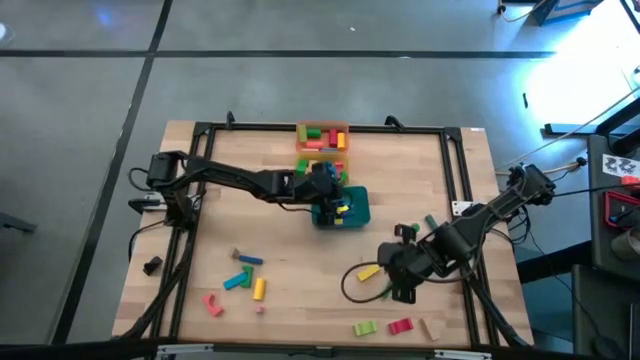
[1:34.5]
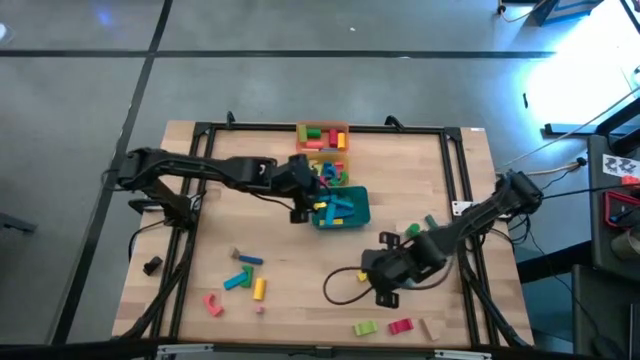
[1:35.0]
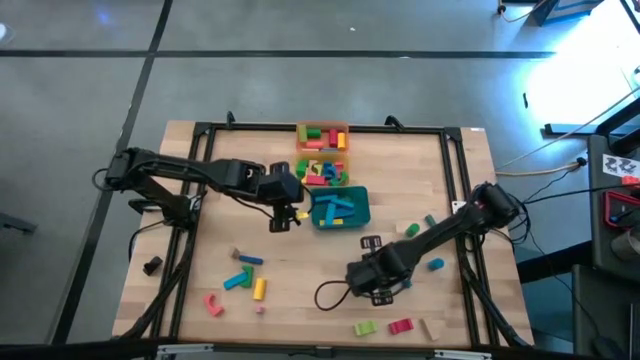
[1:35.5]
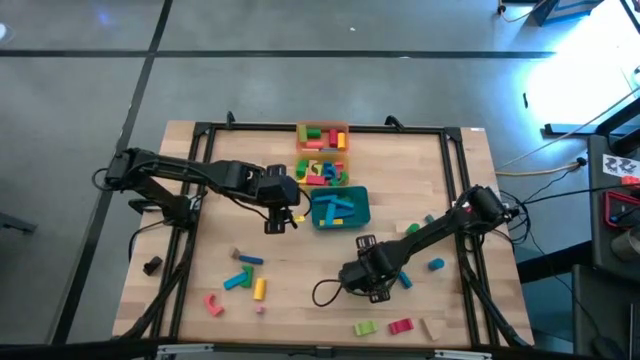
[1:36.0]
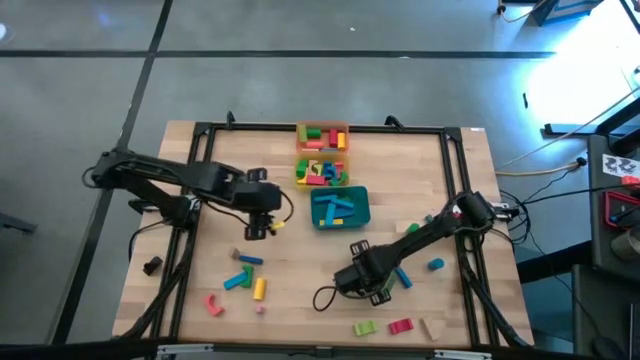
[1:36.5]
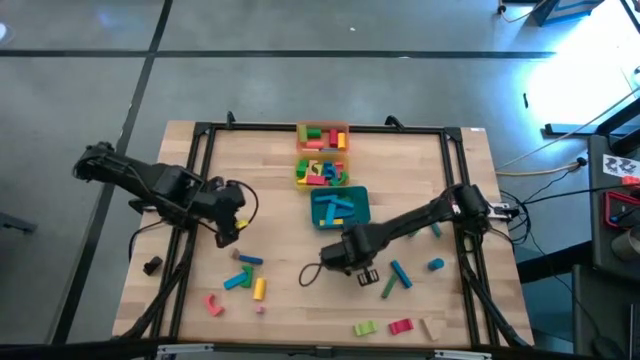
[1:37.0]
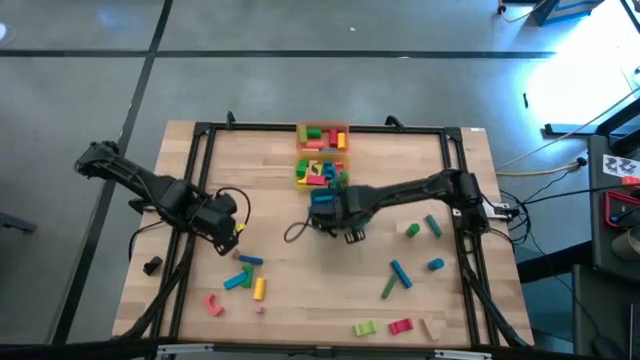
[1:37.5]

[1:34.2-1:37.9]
Task: Sort blocks by size
Put the yellow rectangular block into the blue bin

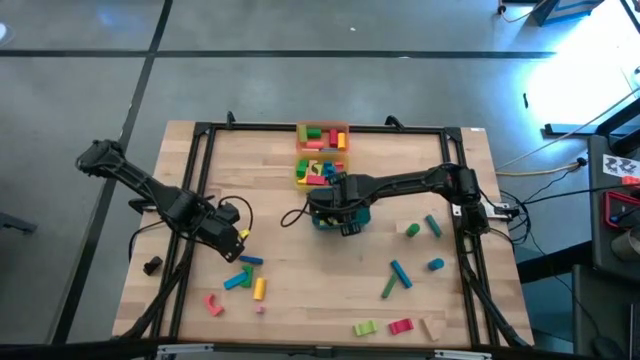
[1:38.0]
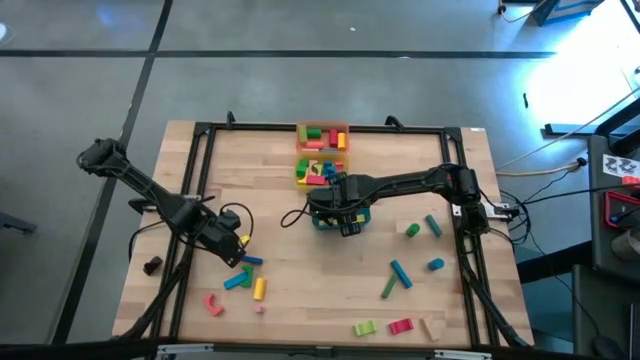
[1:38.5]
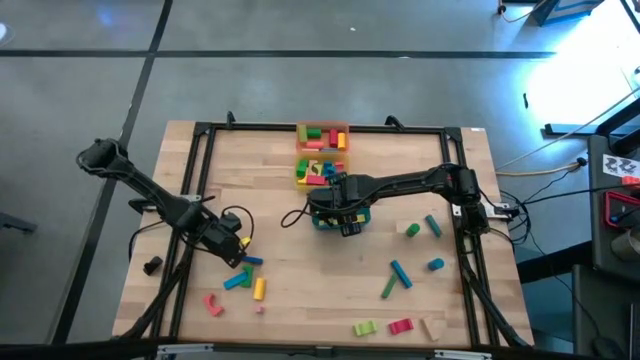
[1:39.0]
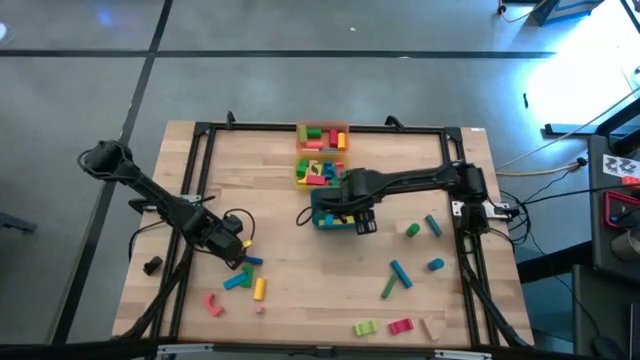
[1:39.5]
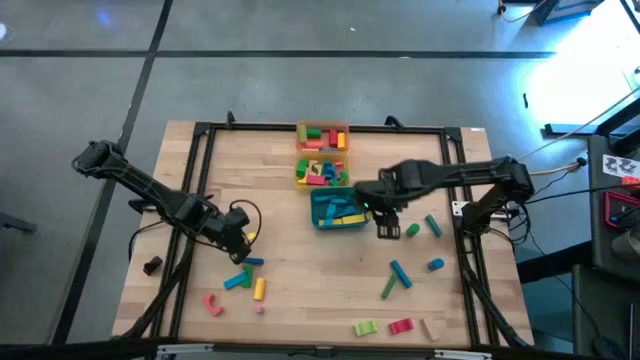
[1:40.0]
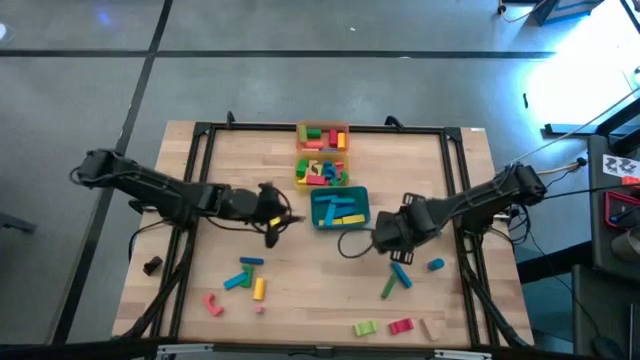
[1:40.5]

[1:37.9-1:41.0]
Put the brown rectangular block into the blue bin

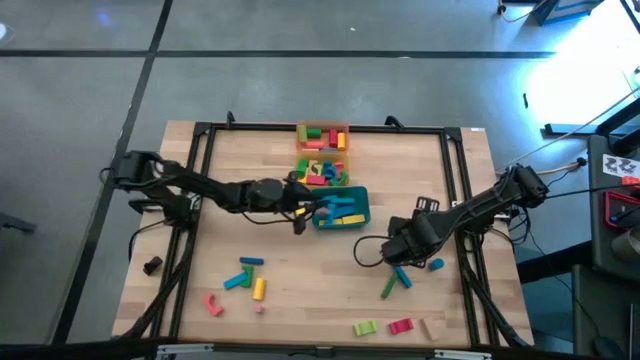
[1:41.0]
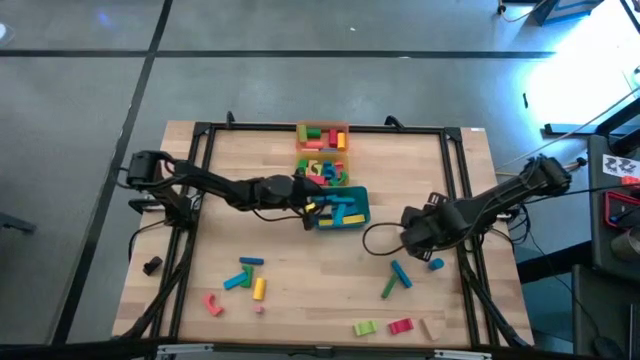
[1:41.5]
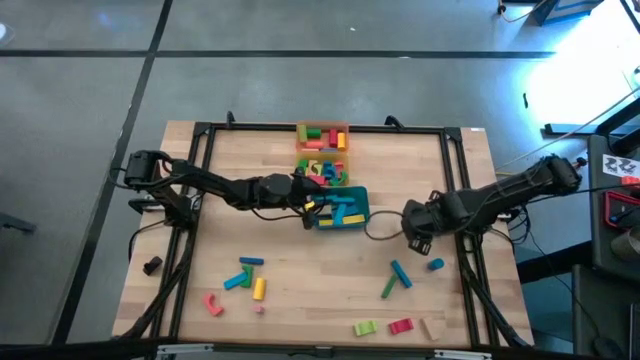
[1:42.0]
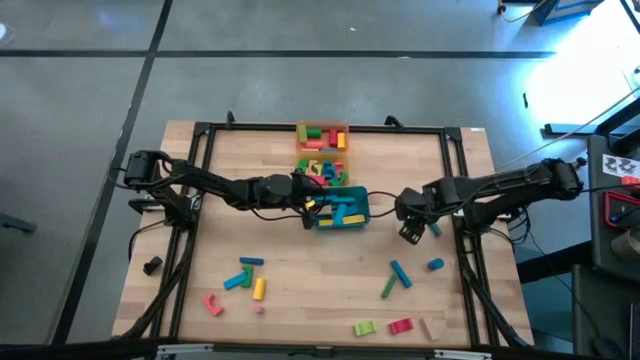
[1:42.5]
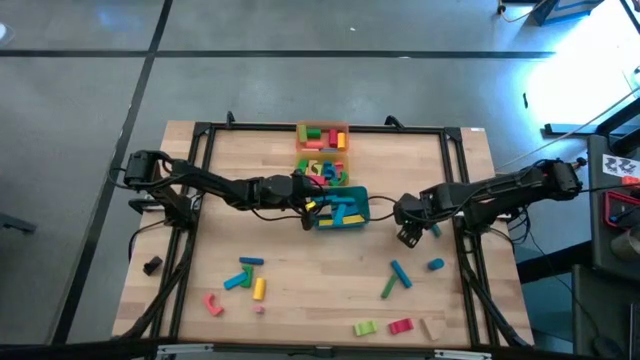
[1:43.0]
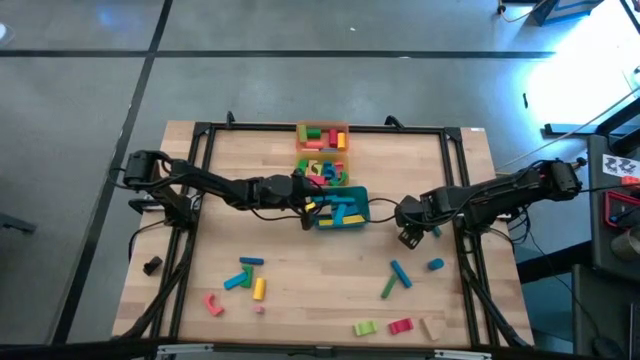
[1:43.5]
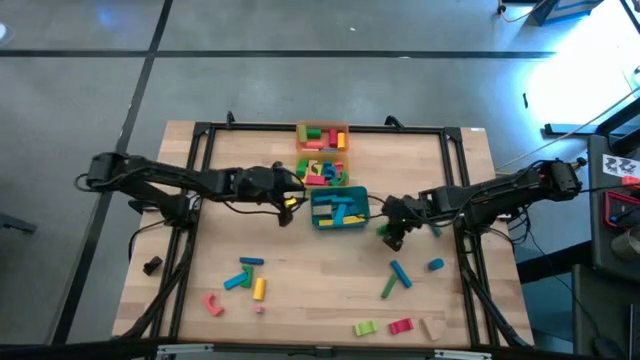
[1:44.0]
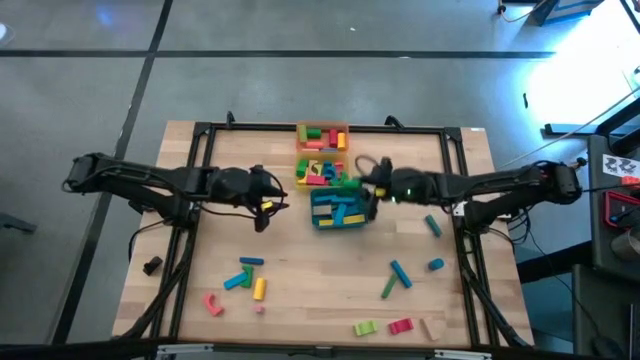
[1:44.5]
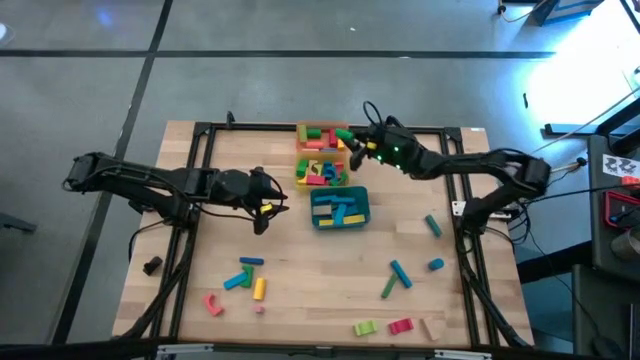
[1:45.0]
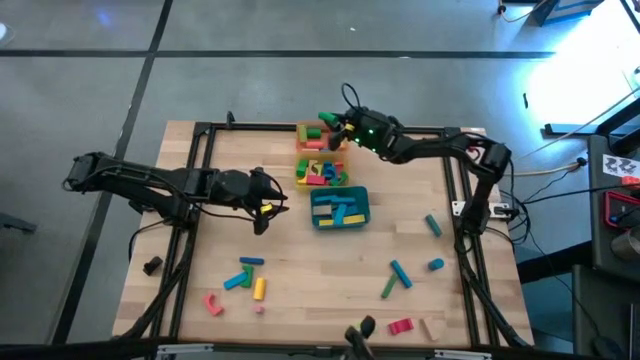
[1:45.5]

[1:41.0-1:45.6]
Put the green cylinder block into the orange bin

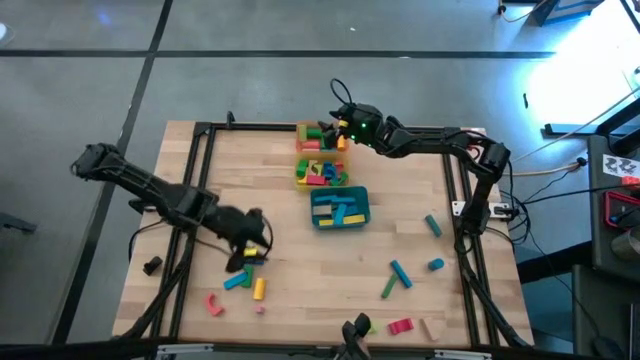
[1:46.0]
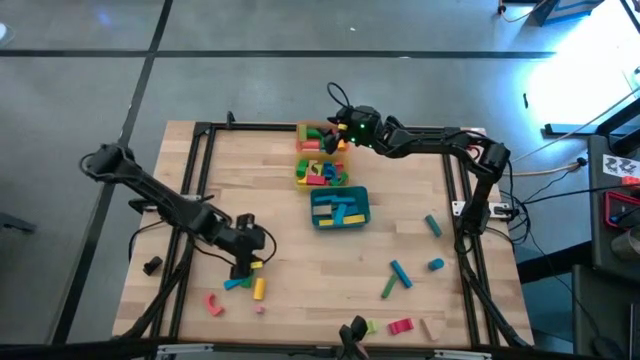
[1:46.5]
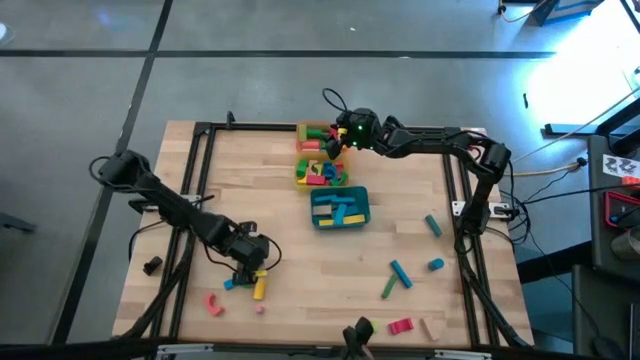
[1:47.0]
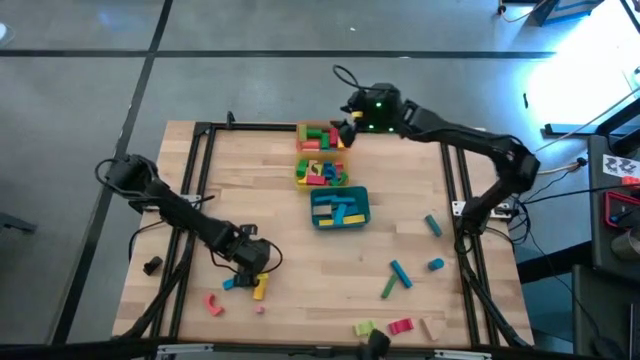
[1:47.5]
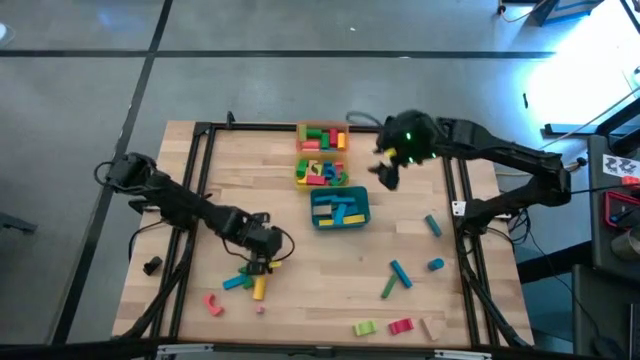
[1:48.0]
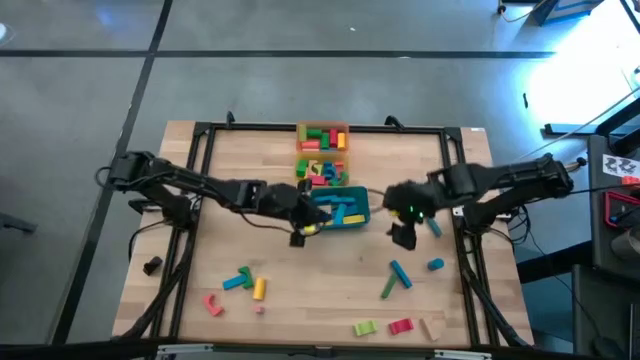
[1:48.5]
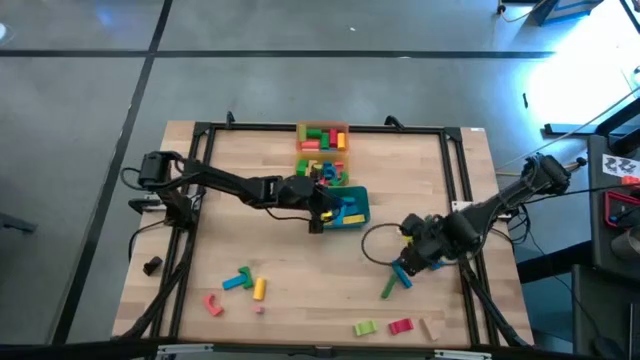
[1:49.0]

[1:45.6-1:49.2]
Put the blue rectangular block into the blue bin

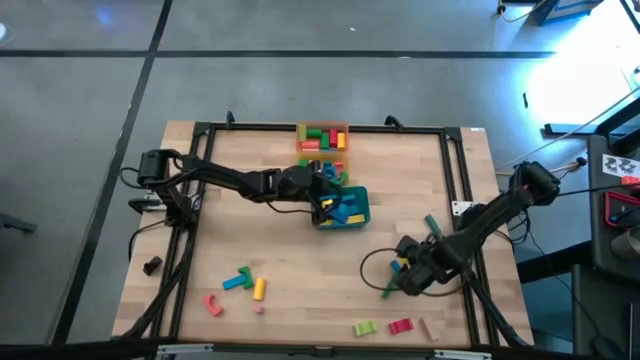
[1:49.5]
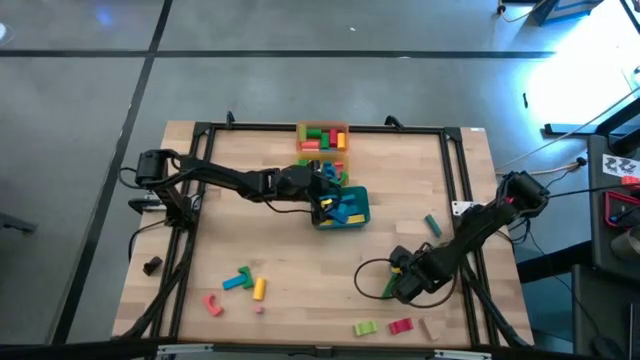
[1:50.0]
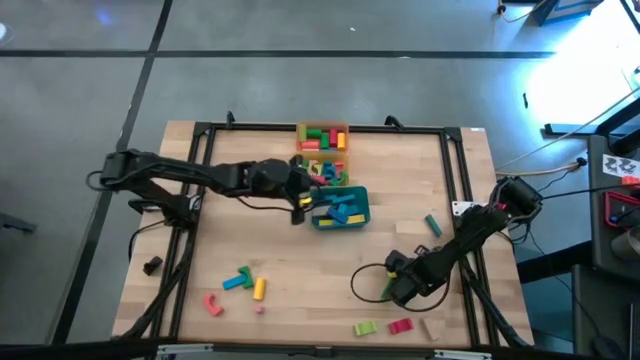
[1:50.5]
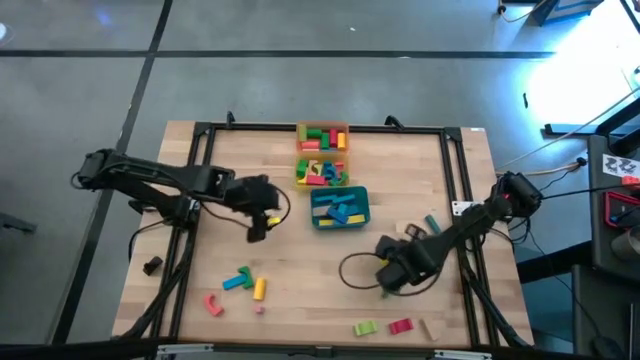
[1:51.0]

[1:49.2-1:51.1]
Put the blue rectangular block into the blue bin

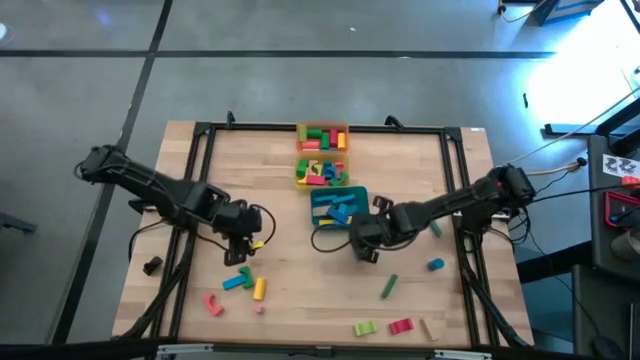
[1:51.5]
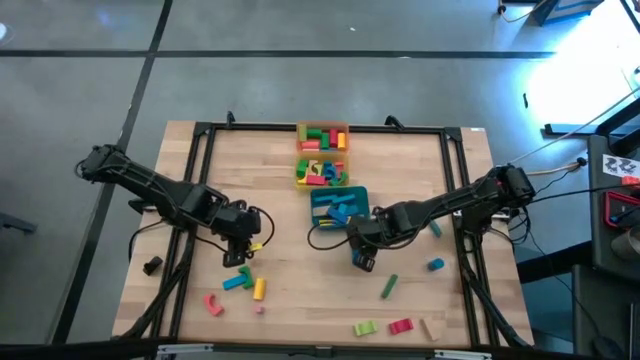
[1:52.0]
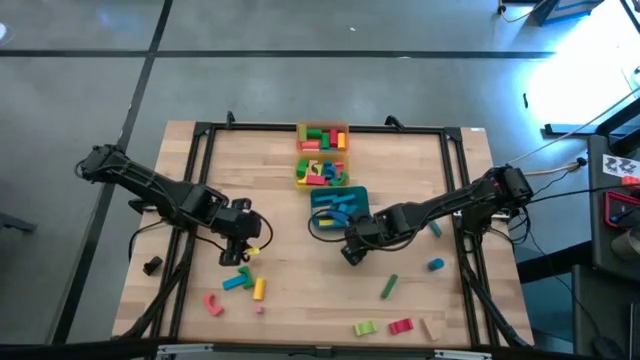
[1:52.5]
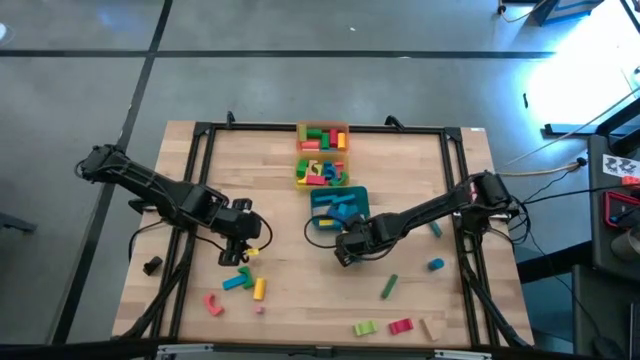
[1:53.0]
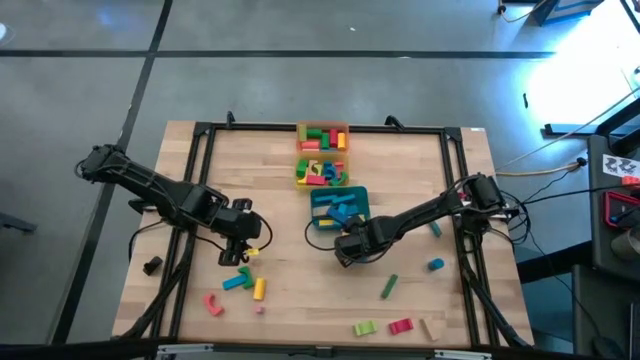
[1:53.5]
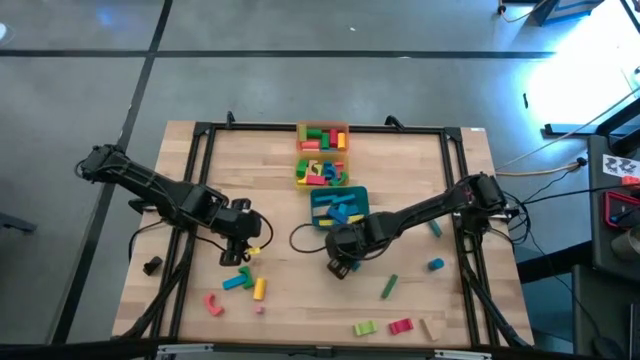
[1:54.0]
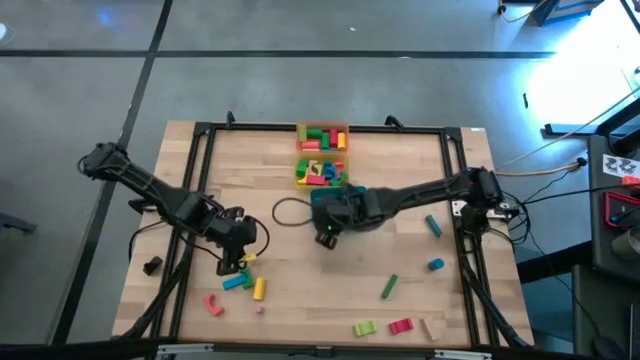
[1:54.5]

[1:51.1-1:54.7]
Put the blue rectangular block into the blue bin

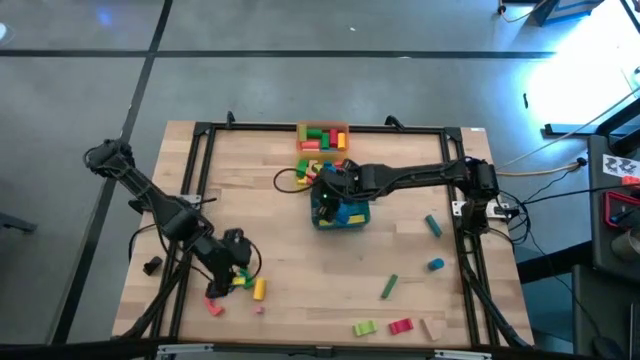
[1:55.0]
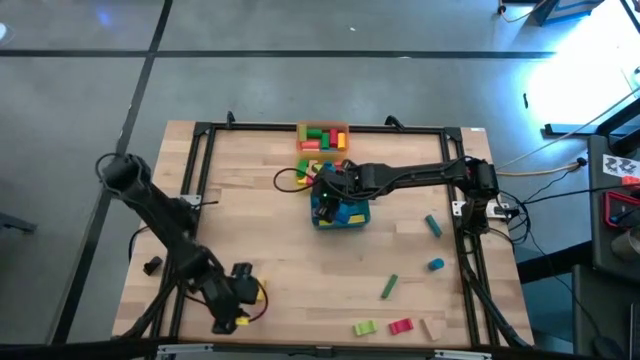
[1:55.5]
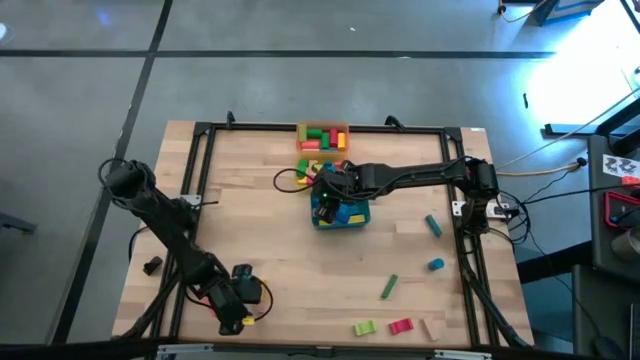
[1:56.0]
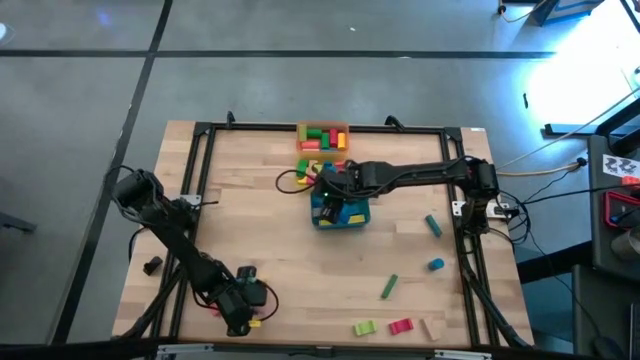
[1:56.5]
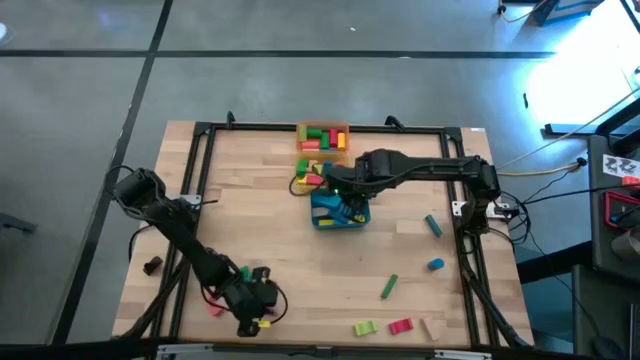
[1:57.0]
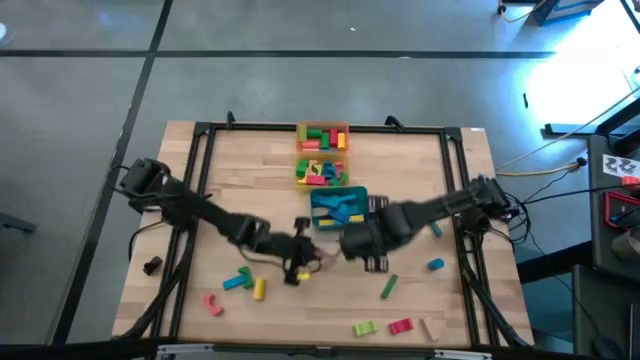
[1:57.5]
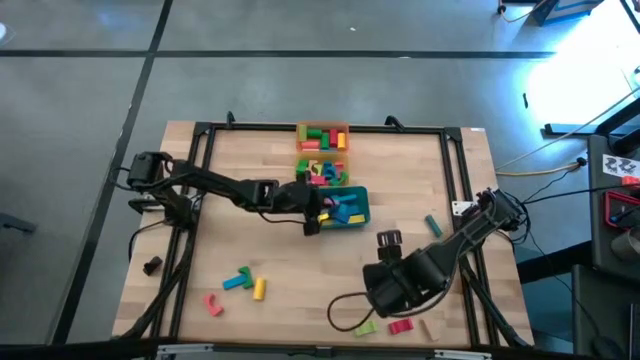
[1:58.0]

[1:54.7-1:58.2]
Put the pink rectangular block into the blue bin
